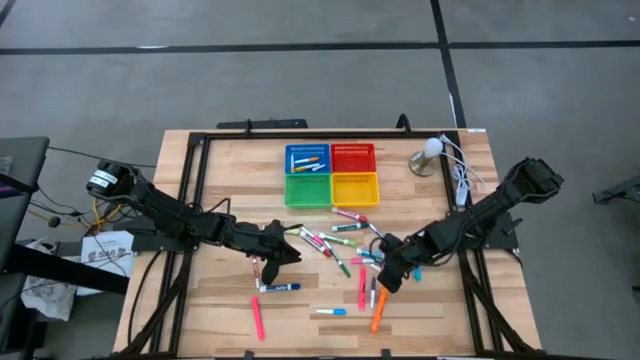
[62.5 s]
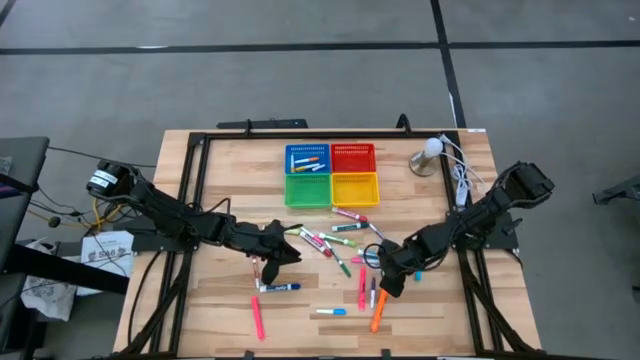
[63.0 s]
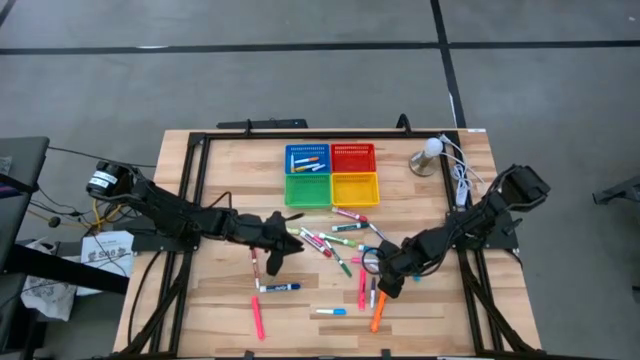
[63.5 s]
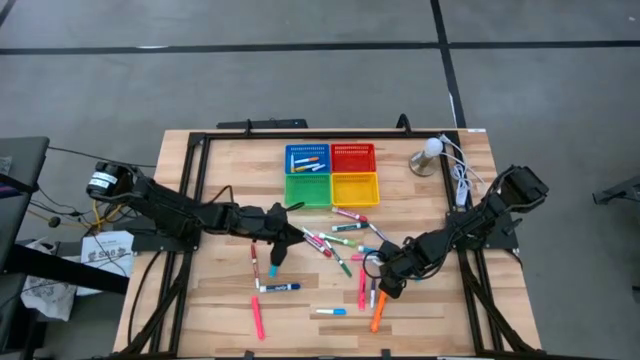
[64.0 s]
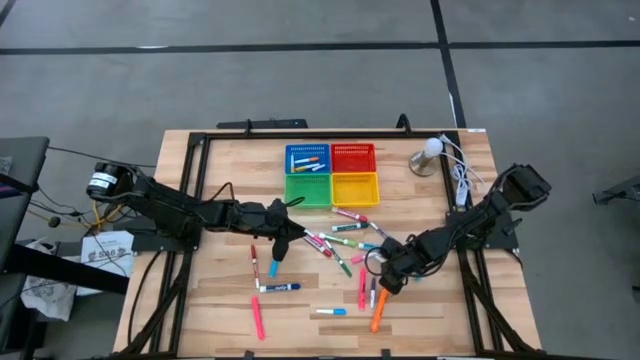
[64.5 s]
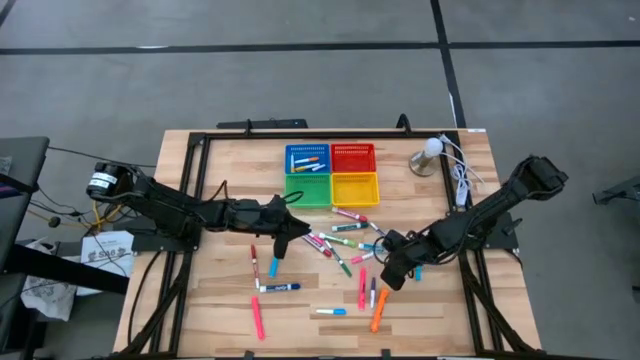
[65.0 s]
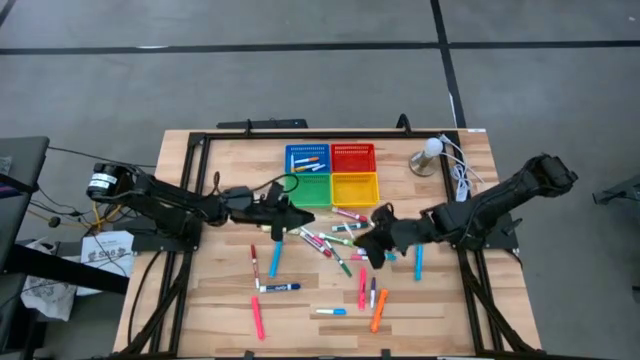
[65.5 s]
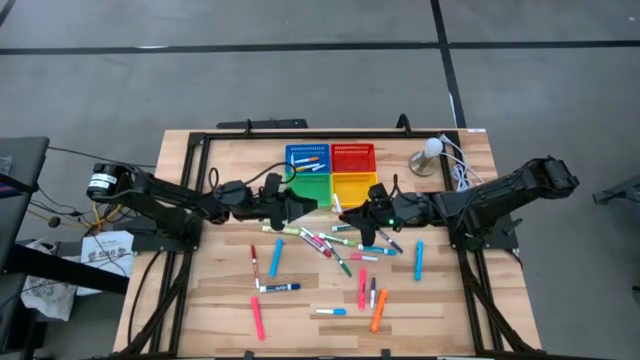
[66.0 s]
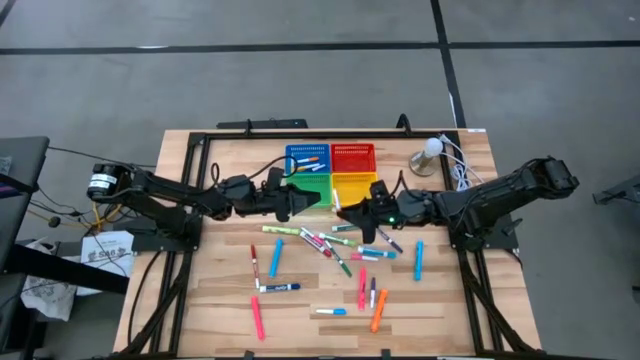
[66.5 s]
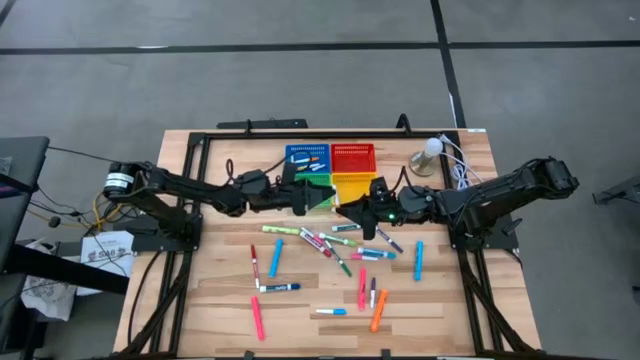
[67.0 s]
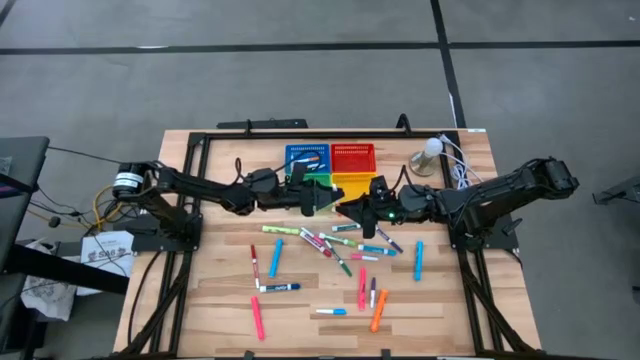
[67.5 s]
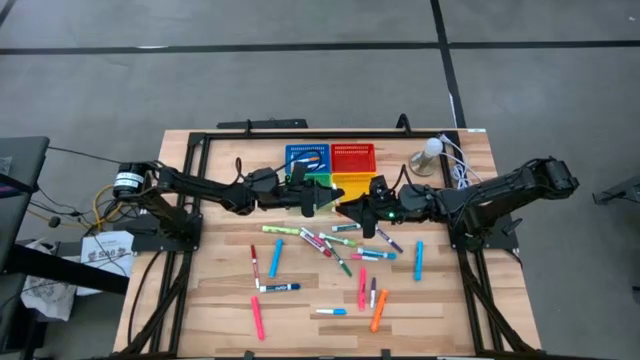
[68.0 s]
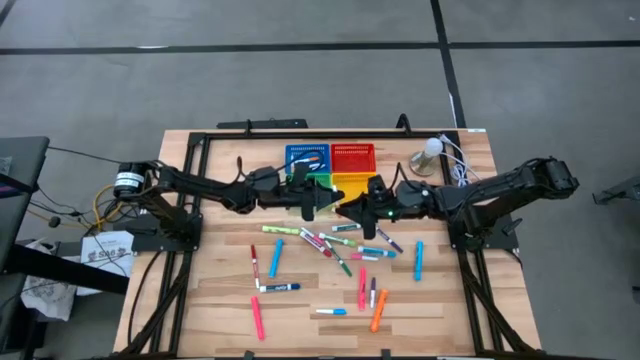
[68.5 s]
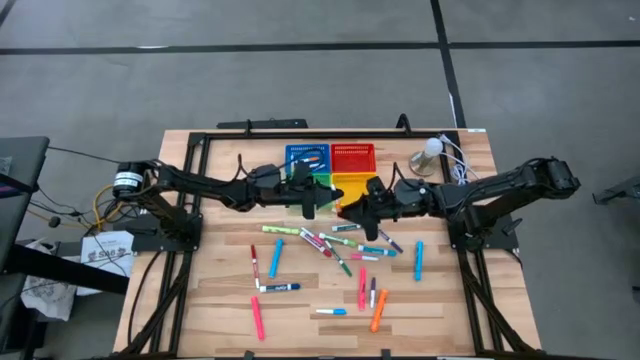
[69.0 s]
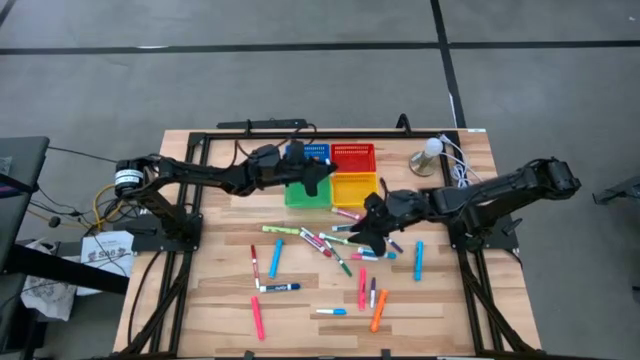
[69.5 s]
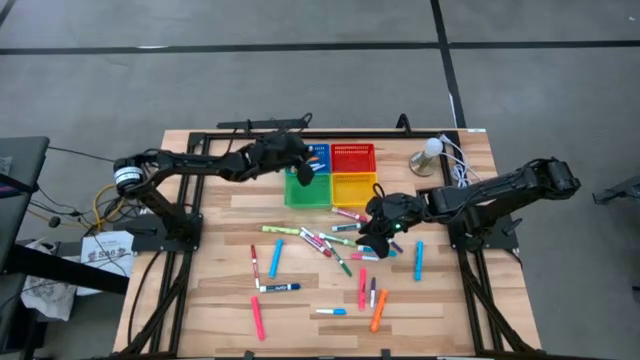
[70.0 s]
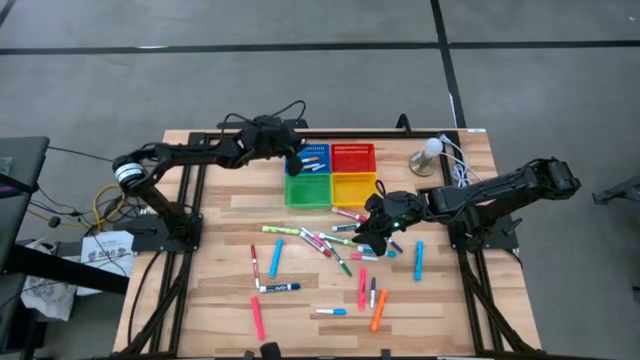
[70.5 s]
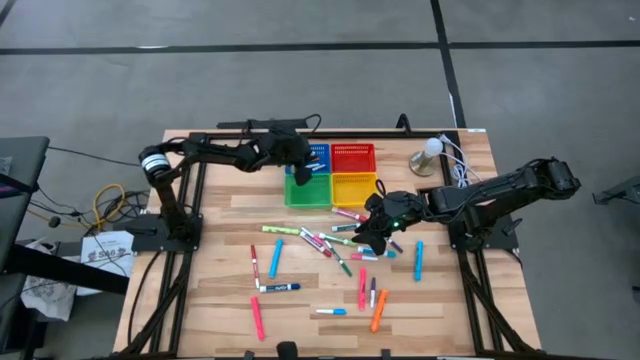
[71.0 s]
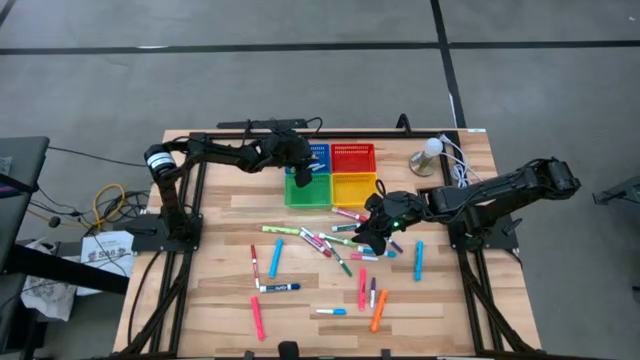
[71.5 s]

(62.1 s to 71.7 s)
Task: Pick & Place Markers
Put the small orange marker into the blue bin

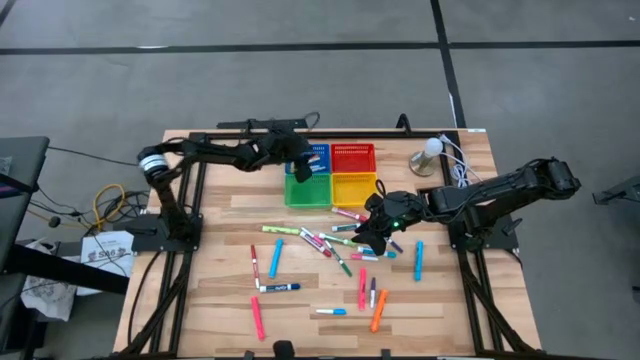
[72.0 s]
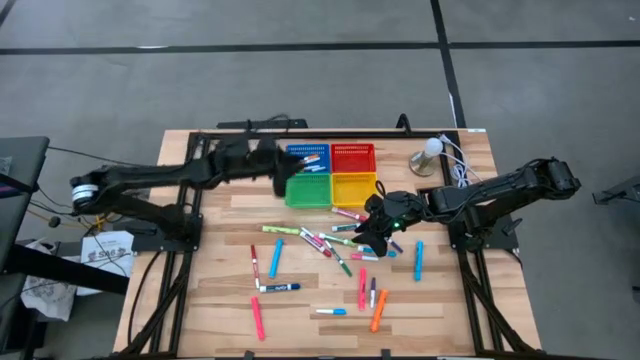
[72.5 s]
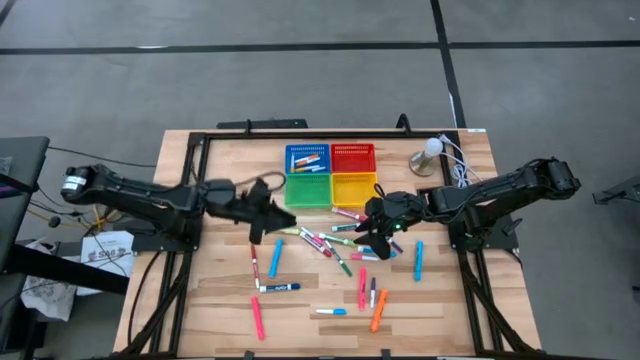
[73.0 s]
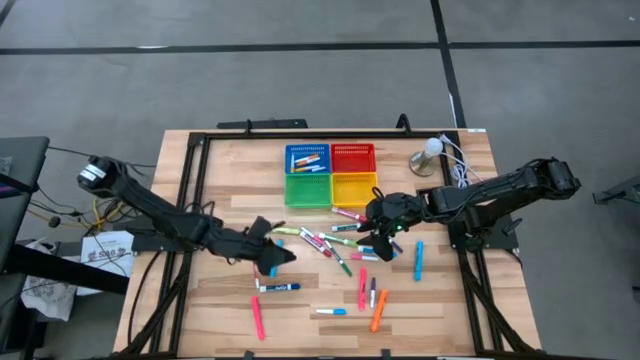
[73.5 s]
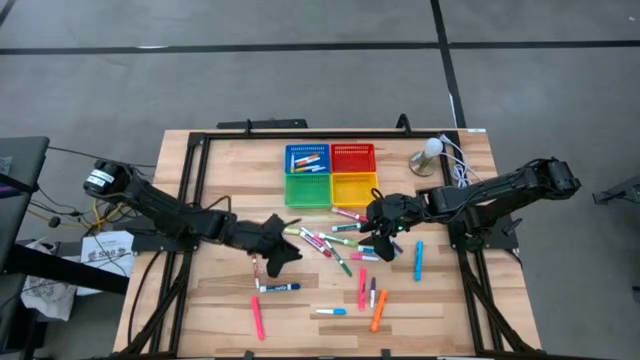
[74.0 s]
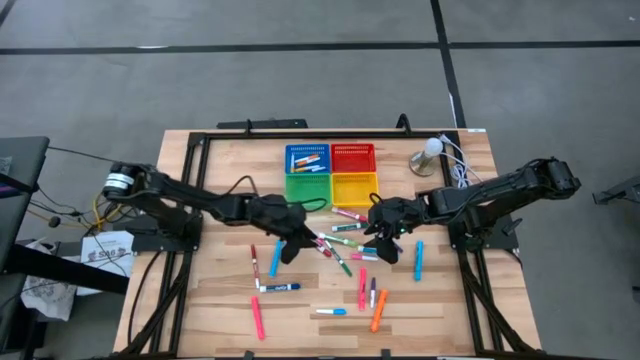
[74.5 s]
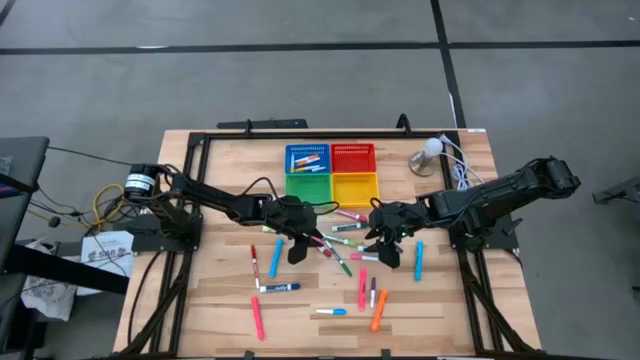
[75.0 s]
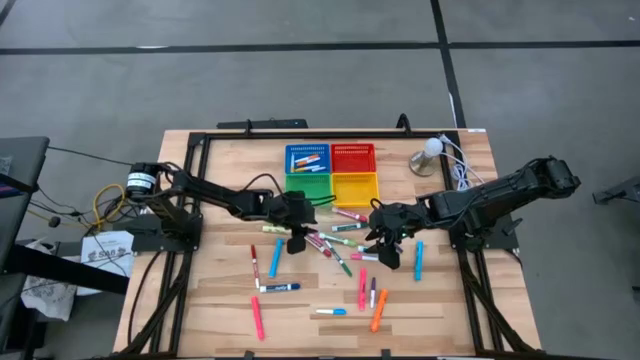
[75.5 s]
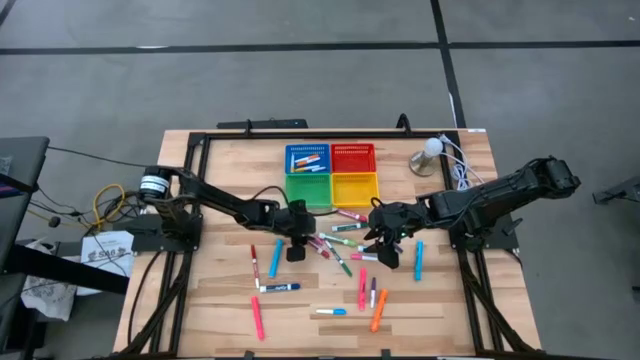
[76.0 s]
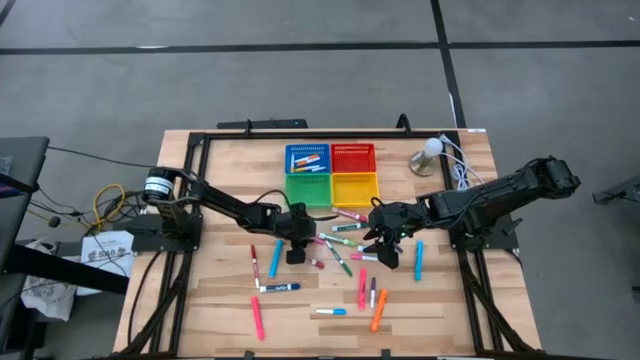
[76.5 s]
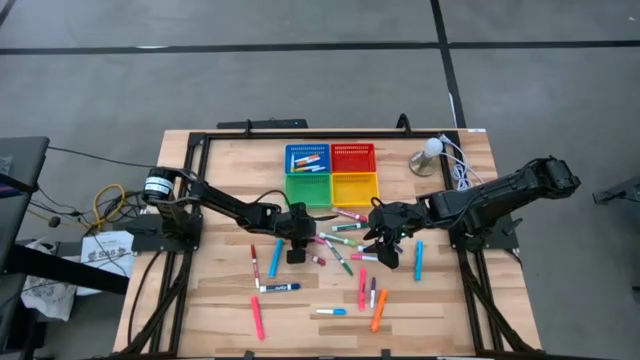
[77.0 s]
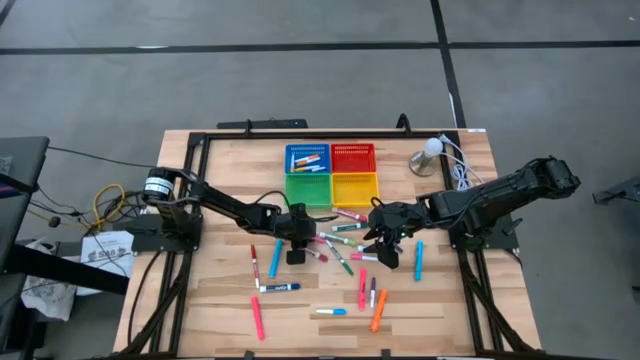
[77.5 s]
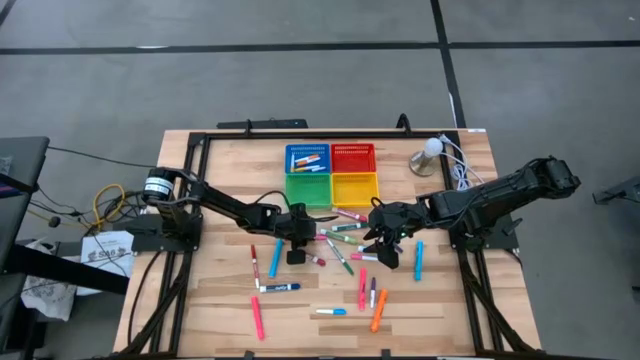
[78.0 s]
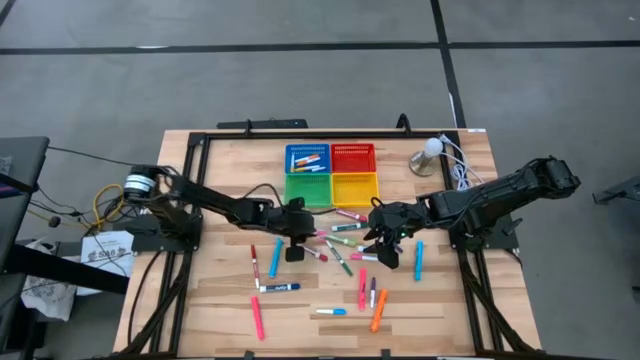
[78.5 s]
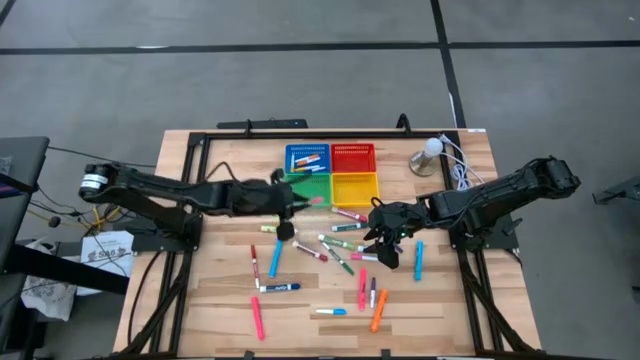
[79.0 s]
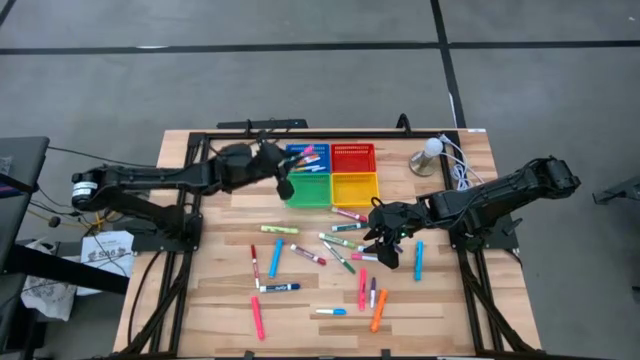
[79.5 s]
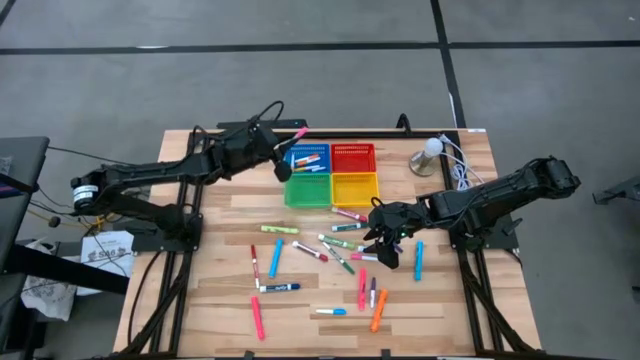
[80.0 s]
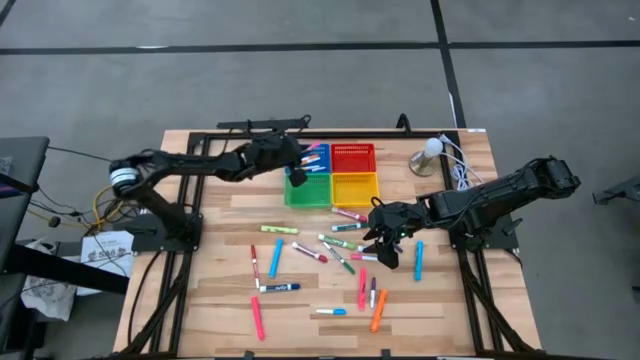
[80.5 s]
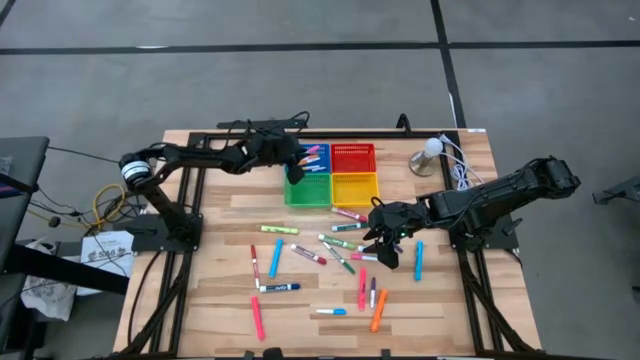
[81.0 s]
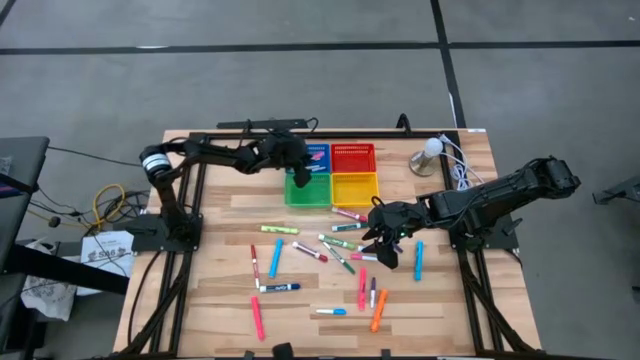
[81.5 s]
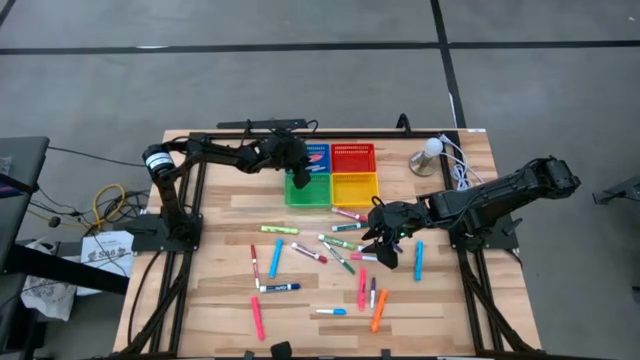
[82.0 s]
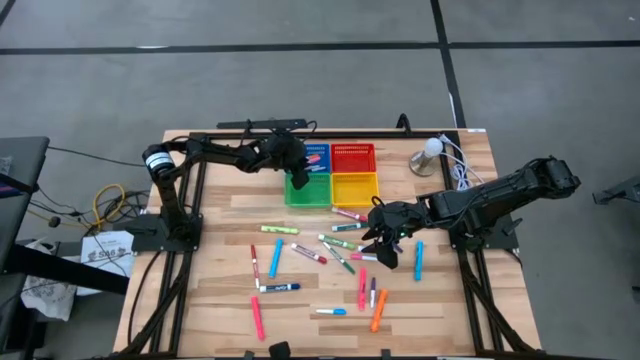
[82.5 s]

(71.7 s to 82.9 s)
Put the top small pink marker into the blue bin
